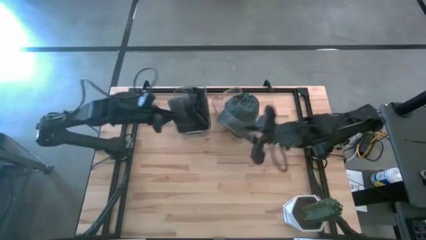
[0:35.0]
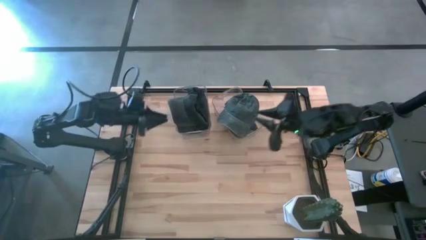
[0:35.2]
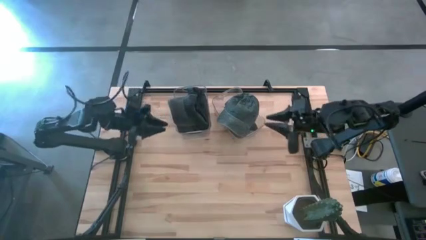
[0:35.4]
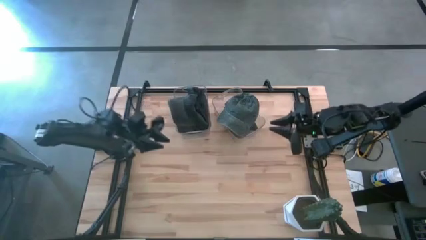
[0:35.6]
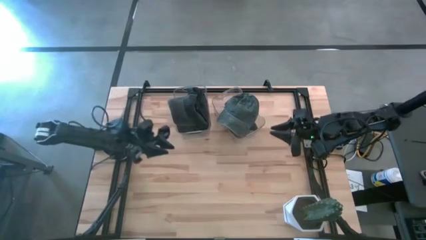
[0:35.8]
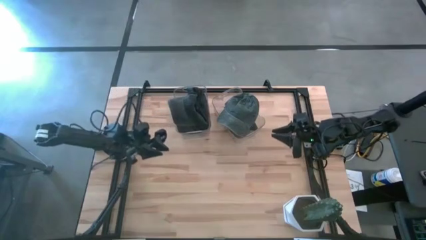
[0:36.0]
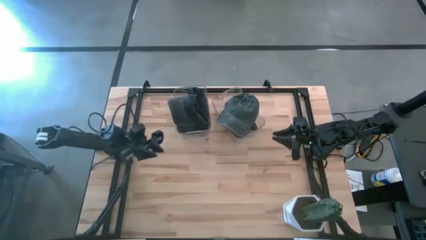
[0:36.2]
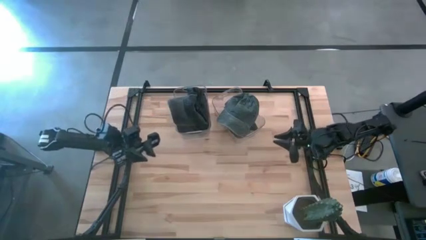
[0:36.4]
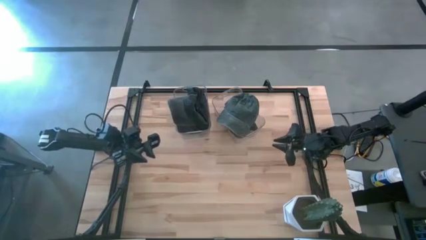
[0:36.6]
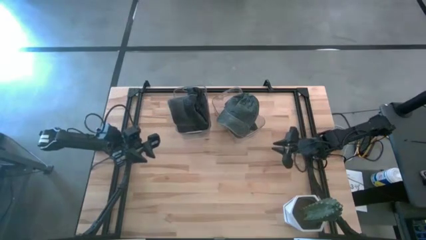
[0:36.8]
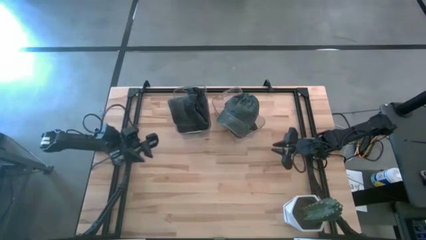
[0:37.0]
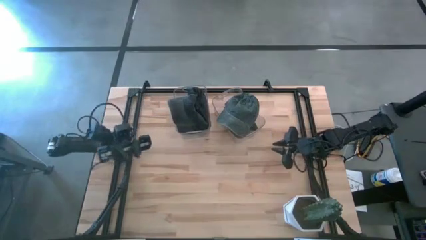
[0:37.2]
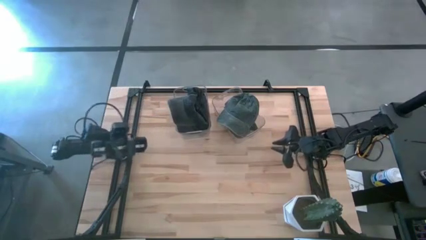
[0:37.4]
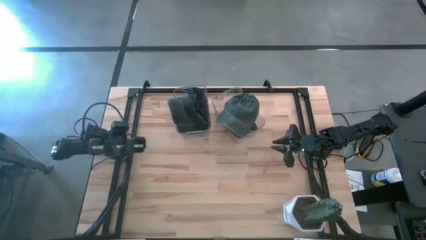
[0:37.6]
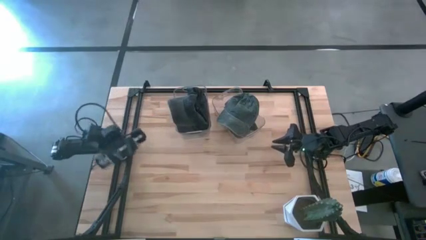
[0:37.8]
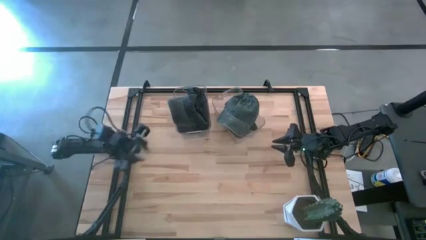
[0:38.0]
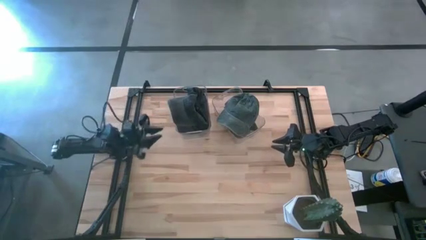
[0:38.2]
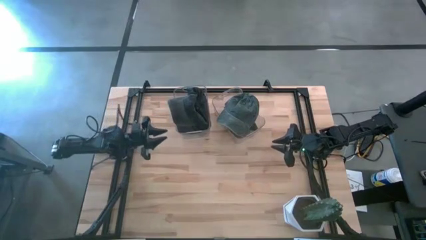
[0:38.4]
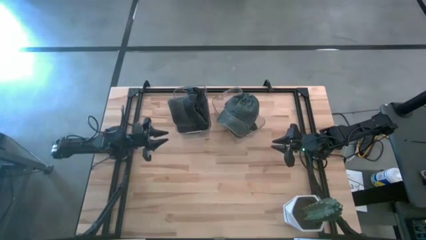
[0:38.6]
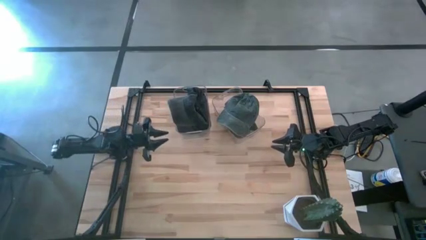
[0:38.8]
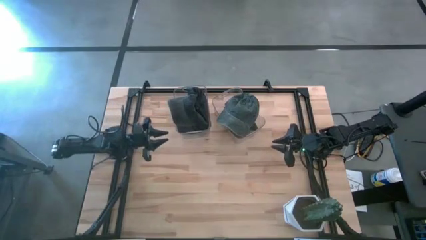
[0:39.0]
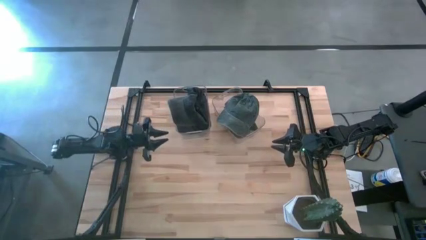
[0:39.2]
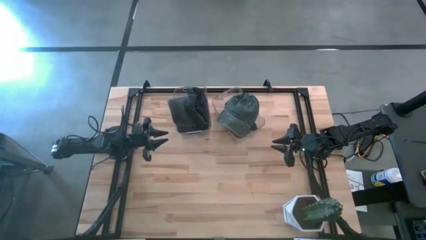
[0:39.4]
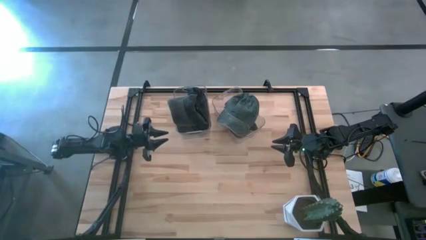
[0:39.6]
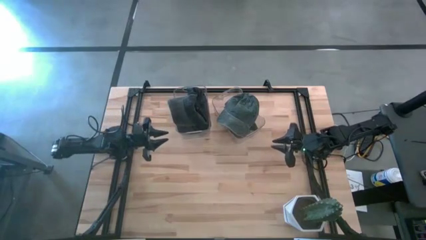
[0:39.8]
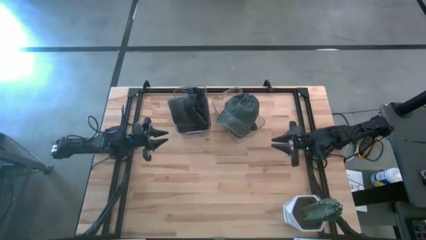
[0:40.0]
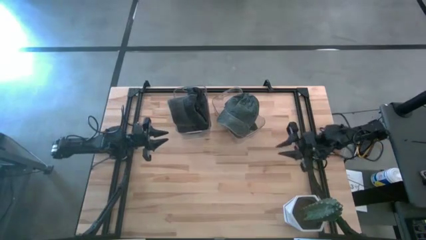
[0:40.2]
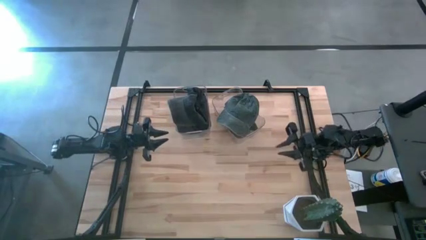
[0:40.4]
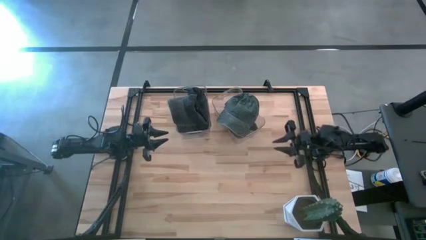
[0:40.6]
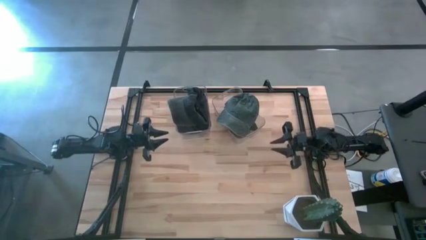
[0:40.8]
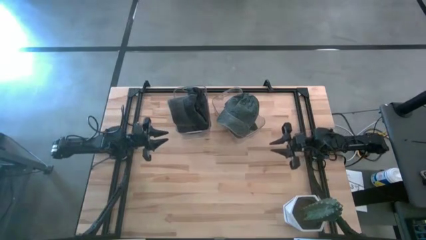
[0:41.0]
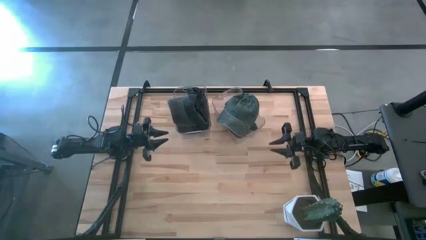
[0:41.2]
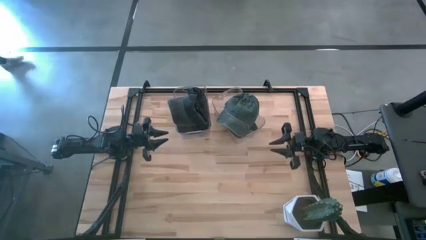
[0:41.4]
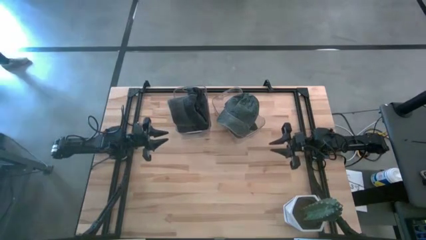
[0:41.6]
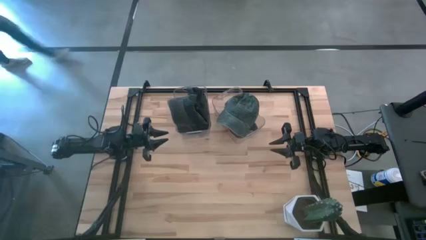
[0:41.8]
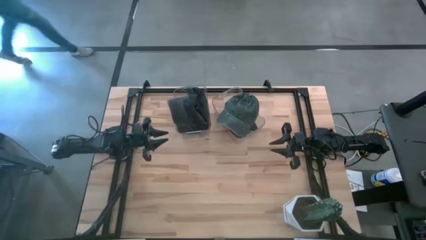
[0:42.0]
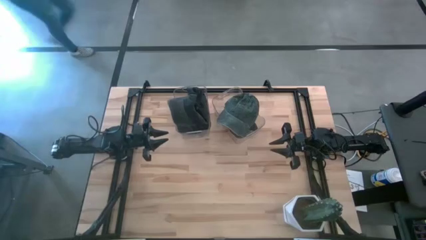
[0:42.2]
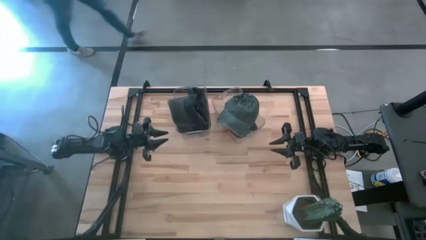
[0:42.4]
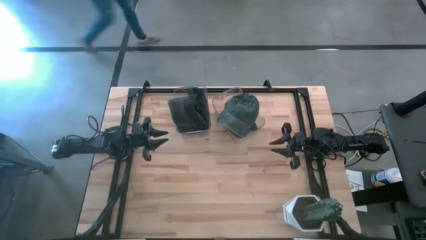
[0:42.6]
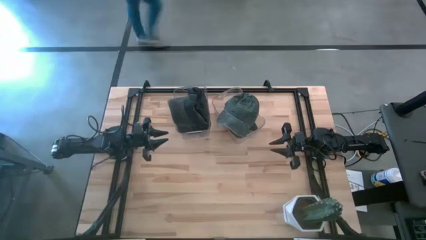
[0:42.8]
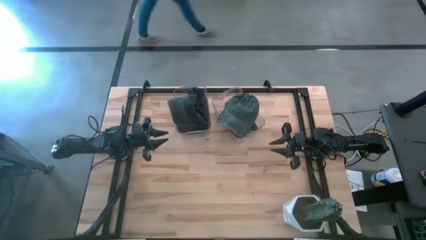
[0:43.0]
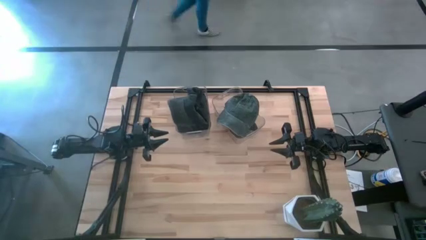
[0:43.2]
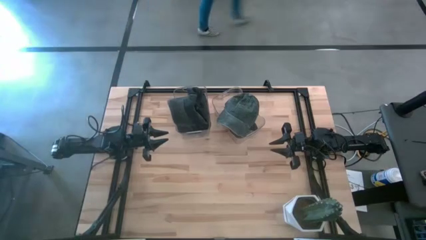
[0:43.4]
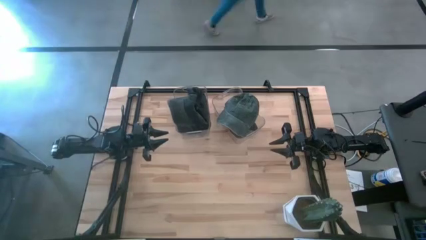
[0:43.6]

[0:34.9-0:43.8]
Task: Pick & Place hat
Return to Home Position

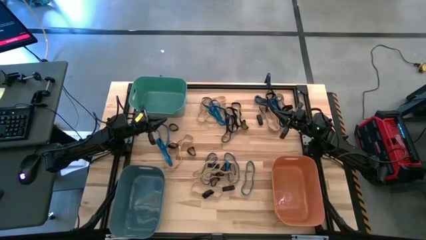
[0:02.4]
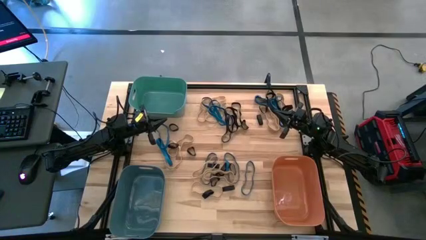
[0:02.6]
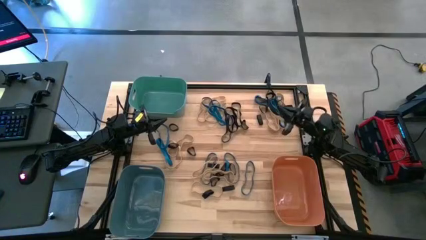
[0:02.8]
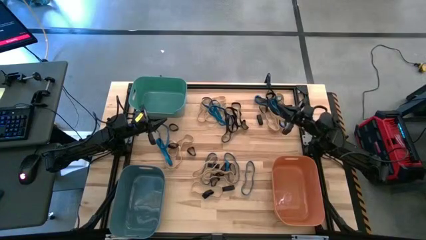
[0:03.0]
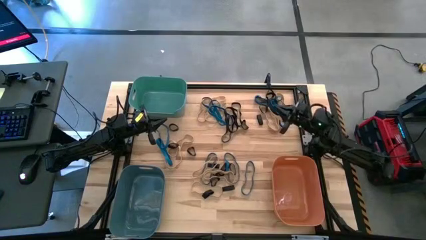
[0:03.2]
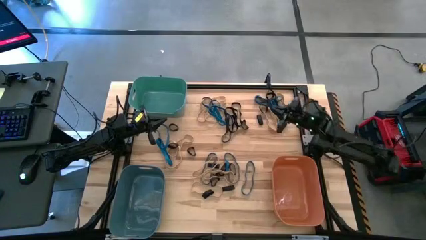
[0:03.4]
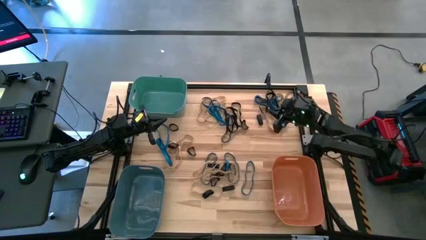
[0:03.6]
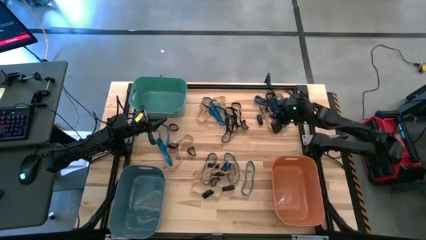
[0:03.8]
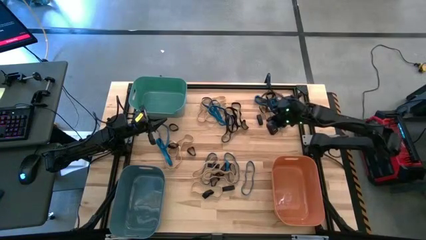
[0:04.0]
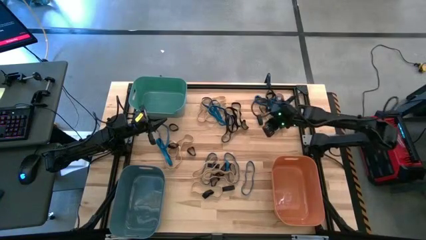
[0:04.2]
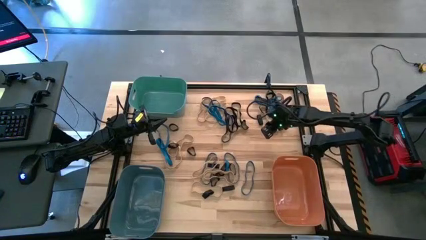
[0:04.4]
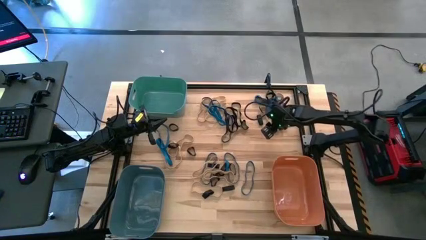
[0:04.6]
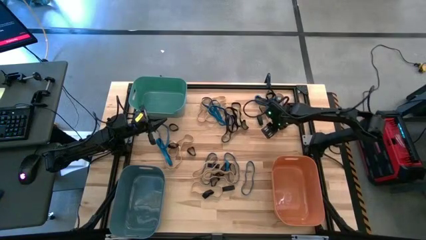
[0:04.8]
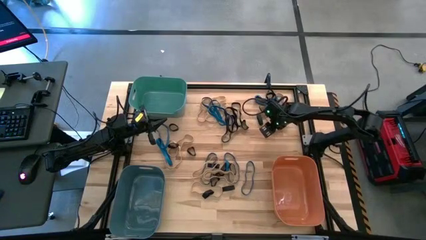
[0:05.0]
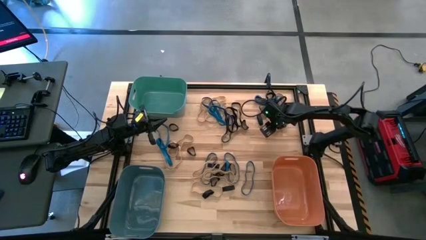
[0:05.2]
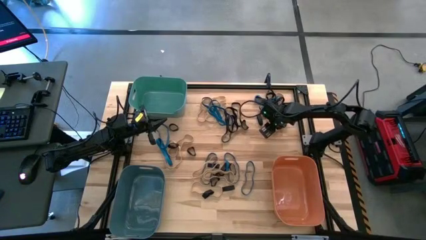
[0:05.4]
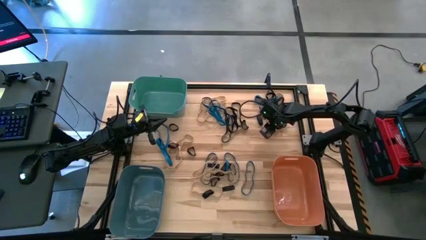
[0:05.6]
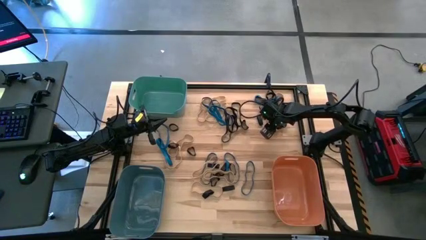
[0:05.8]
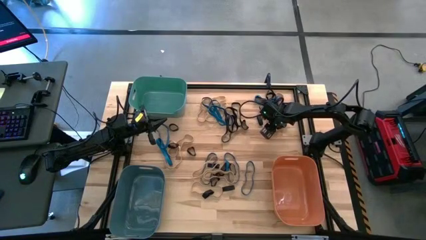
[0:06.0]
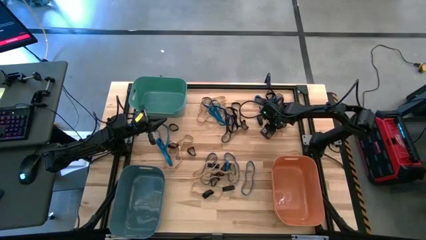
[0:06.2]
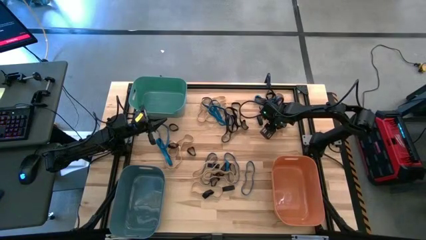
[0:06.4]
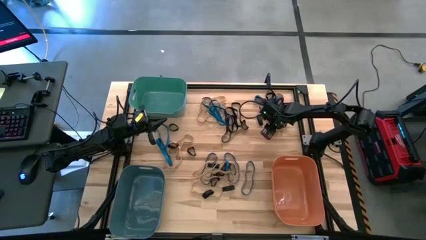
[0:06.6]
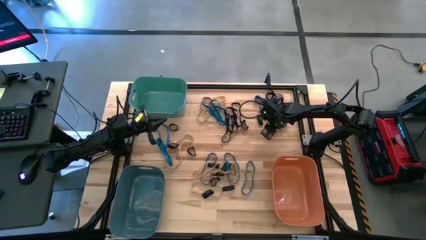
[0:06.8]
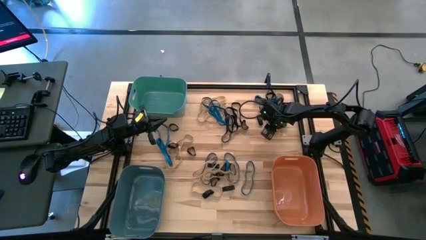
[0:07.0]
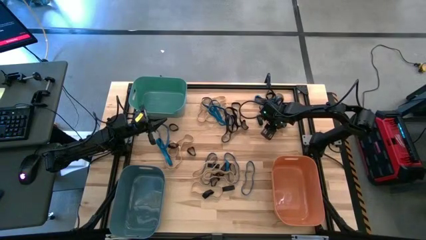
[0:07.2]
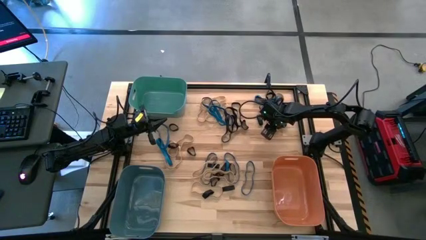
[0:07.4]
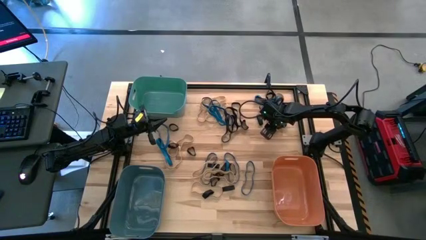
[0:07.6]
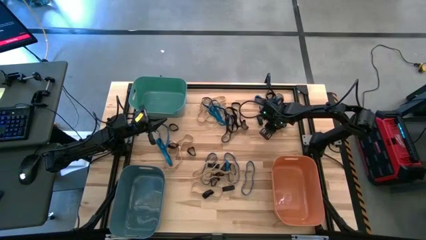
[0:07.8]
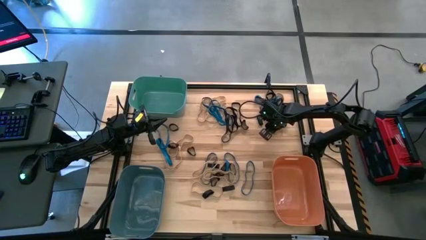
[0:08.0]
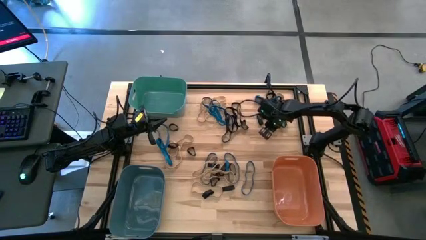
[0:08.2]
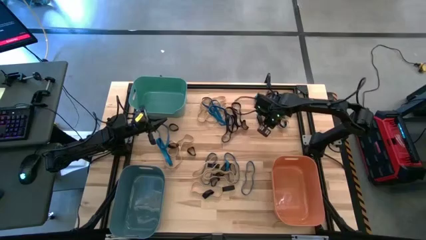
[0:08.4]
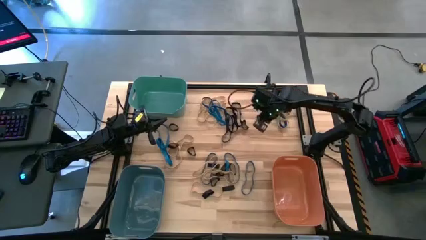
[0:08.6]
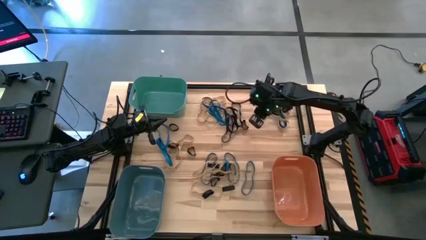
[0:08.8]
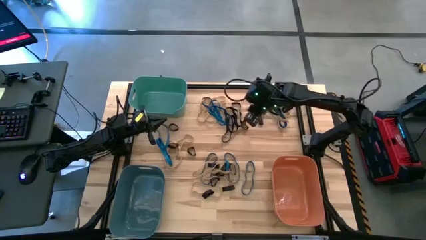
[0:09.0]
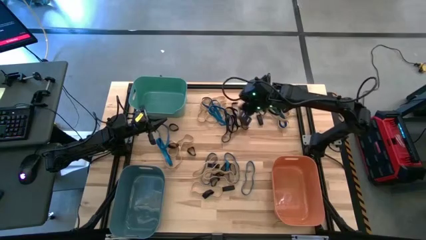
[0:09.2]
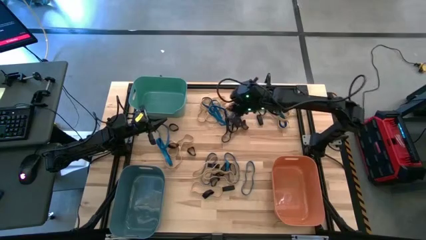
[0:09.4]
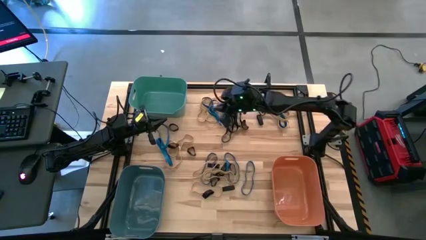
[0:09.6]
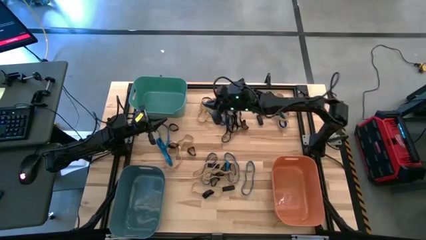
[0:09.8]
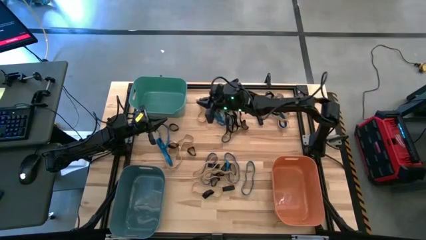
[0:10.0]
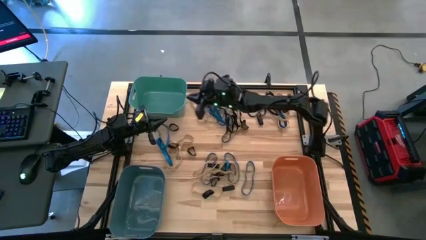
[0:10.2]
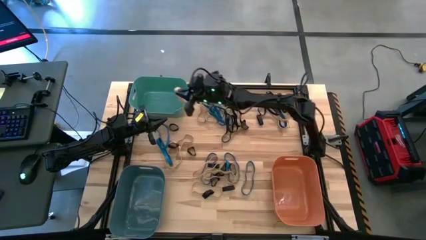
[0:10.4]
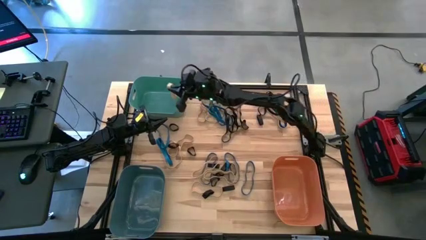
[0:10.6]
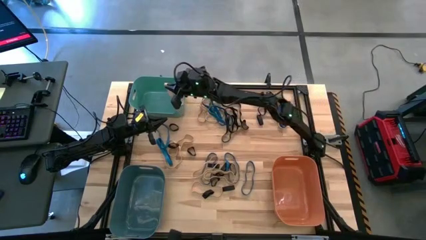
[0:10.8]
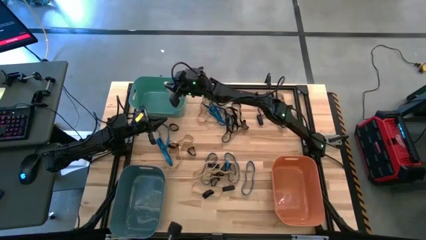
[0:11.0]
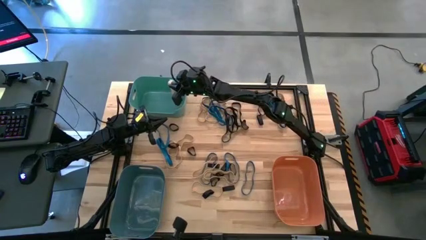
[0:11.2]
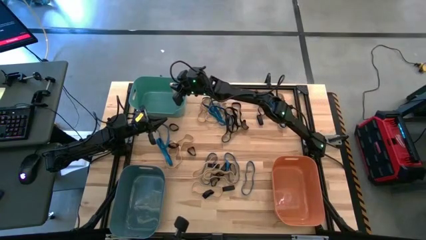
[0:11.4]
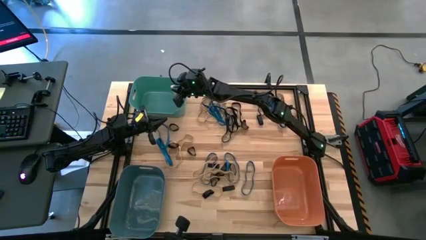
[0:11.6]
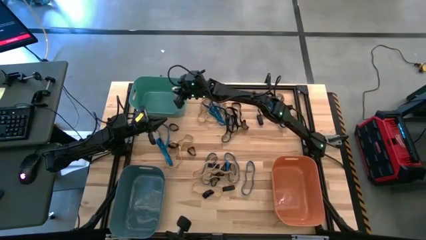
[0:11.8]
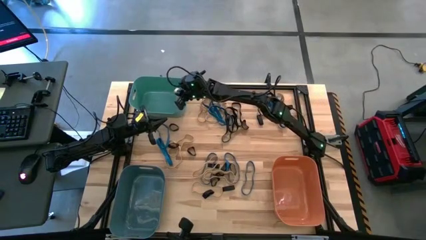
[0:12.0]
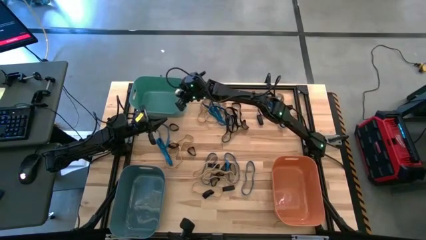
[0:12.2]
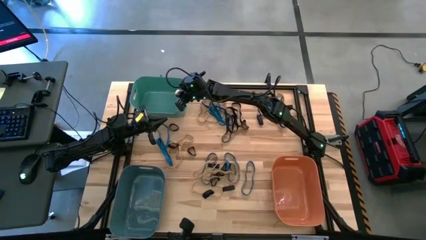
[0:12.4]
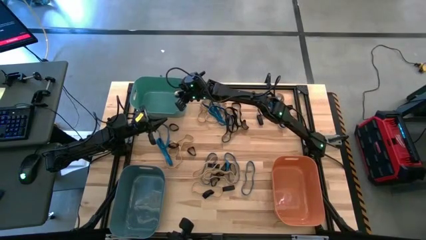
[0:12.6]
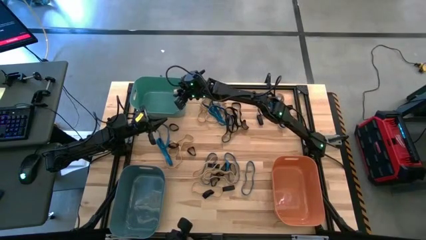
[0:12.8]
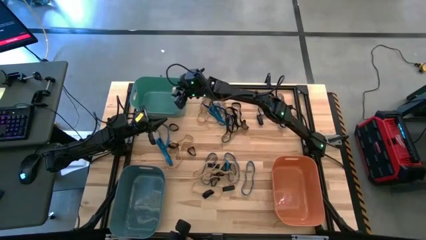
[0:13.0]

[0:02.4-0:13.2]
Task: Sort rubber bands into baskets
Put the brown rubber band into the green bin
